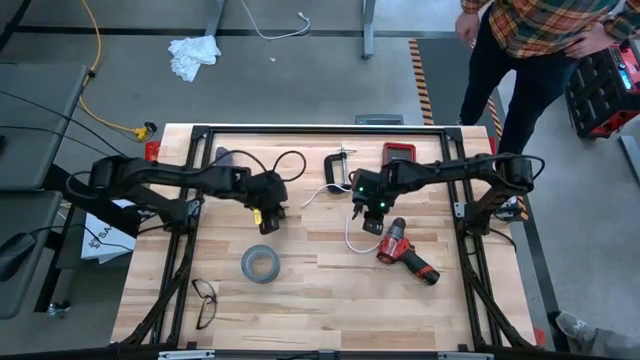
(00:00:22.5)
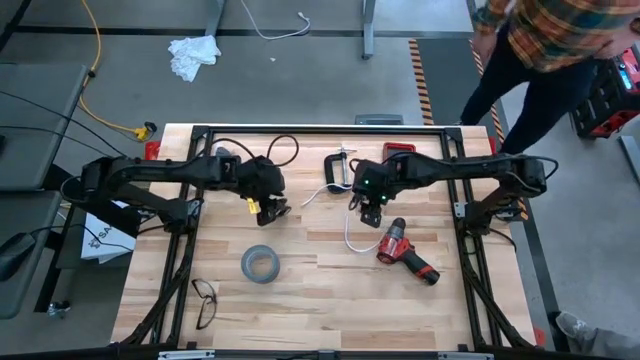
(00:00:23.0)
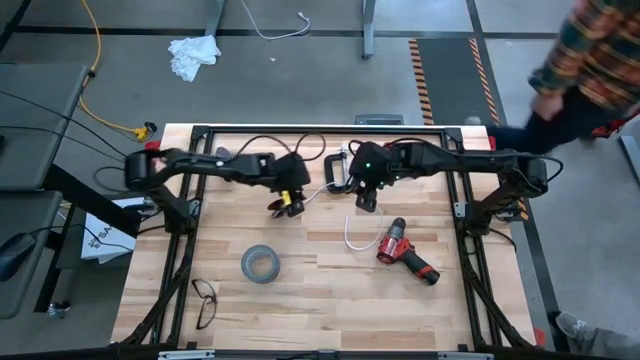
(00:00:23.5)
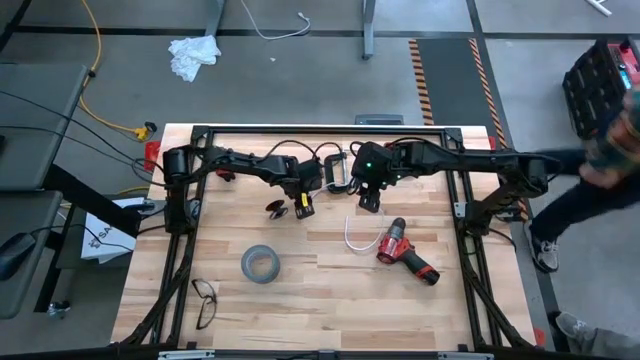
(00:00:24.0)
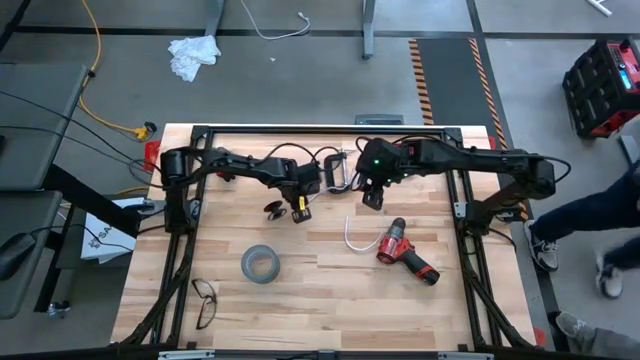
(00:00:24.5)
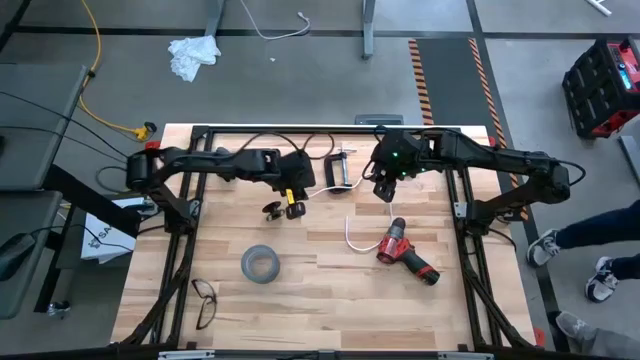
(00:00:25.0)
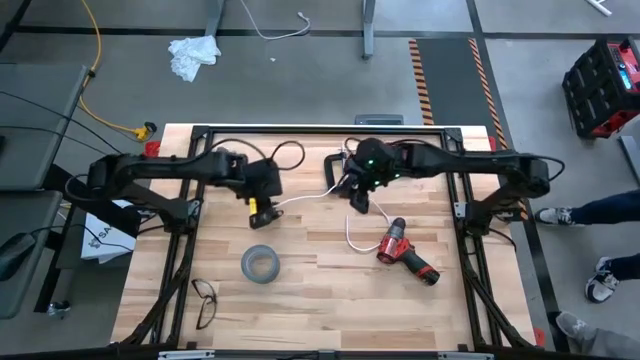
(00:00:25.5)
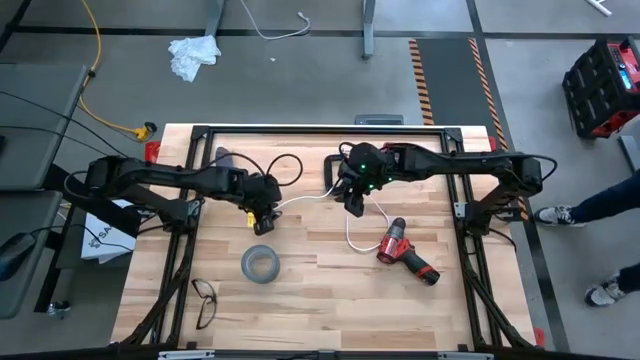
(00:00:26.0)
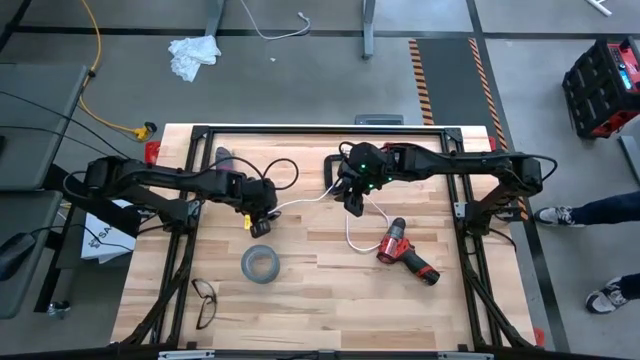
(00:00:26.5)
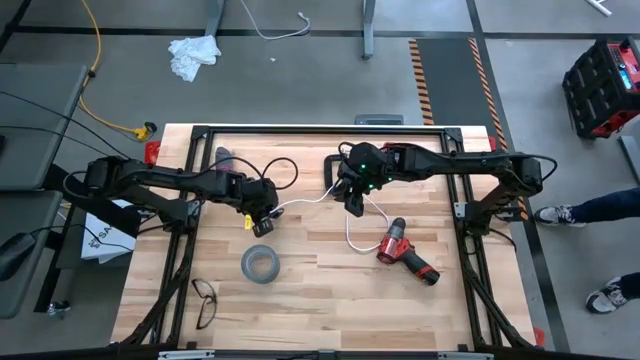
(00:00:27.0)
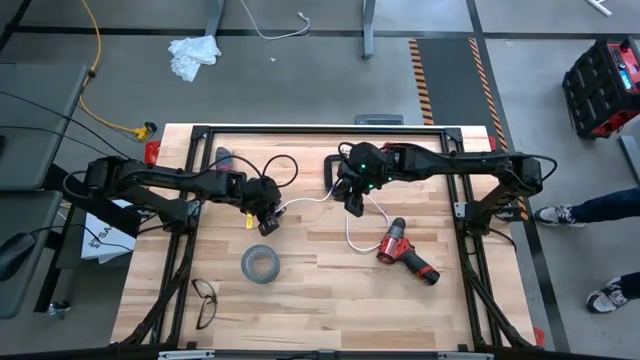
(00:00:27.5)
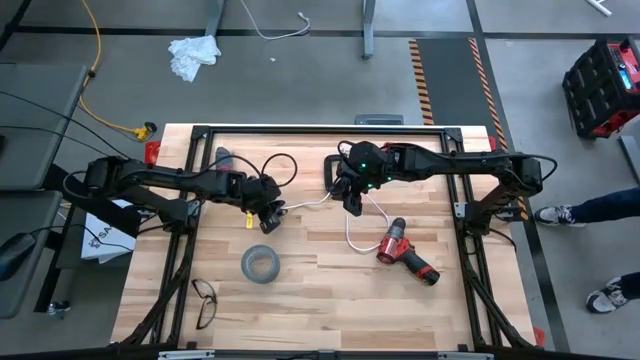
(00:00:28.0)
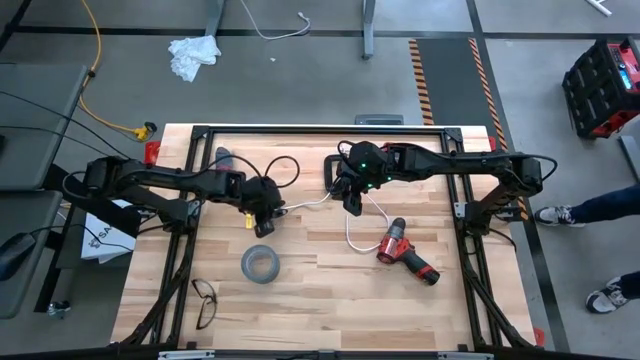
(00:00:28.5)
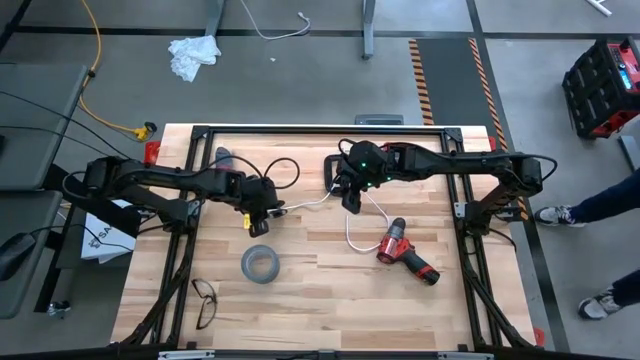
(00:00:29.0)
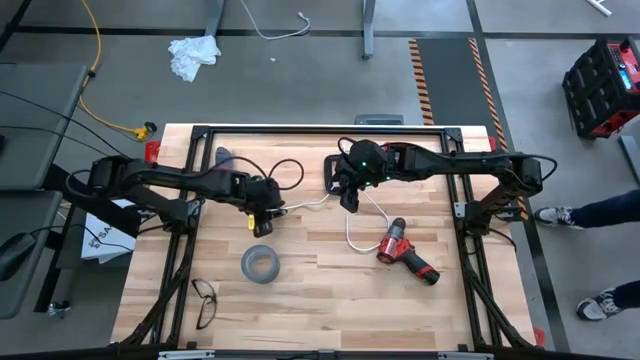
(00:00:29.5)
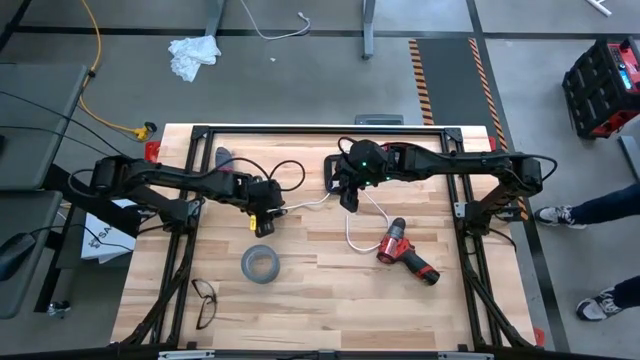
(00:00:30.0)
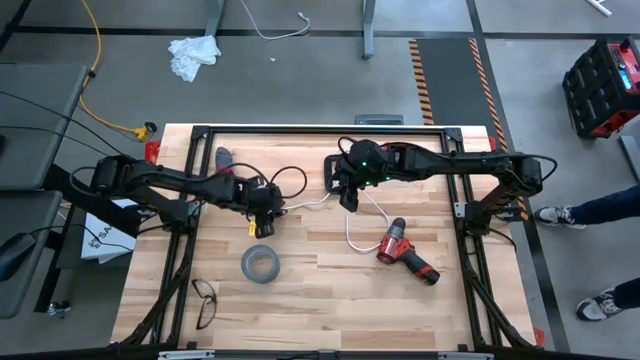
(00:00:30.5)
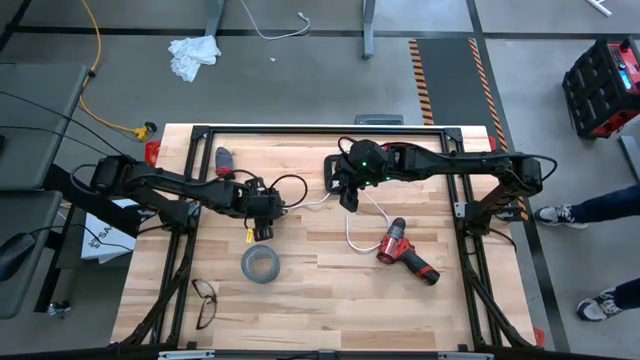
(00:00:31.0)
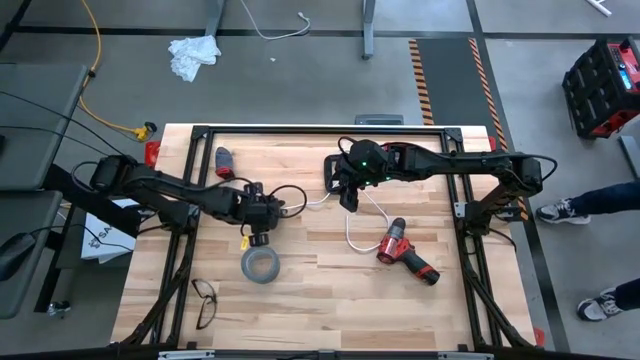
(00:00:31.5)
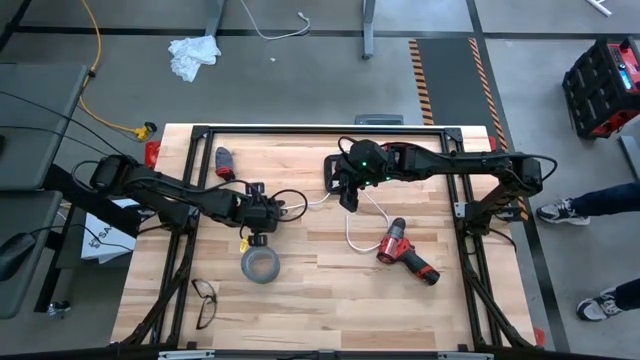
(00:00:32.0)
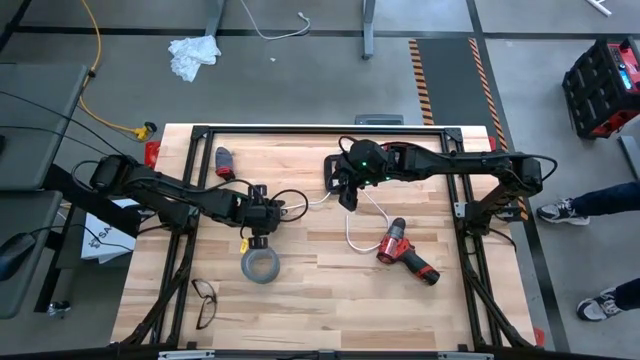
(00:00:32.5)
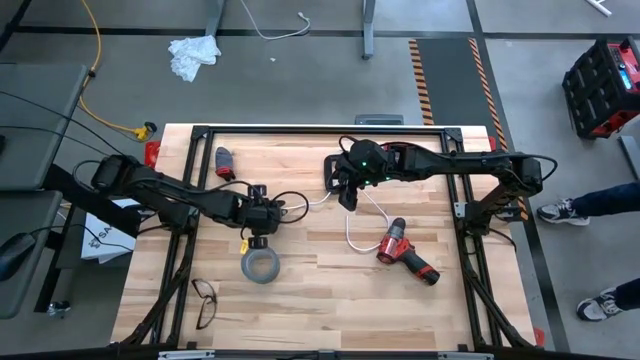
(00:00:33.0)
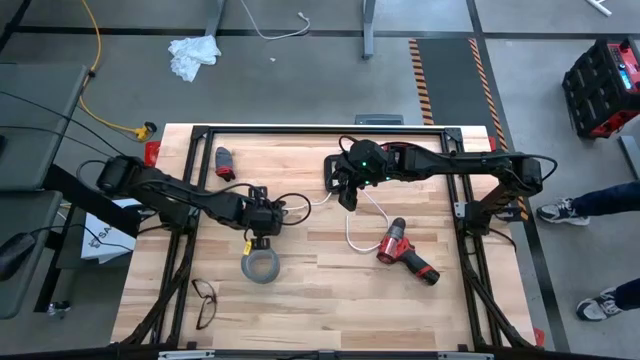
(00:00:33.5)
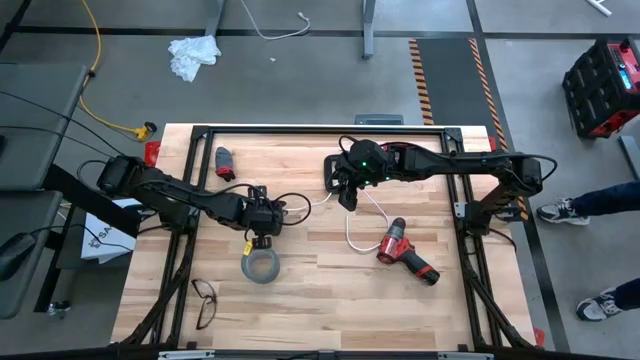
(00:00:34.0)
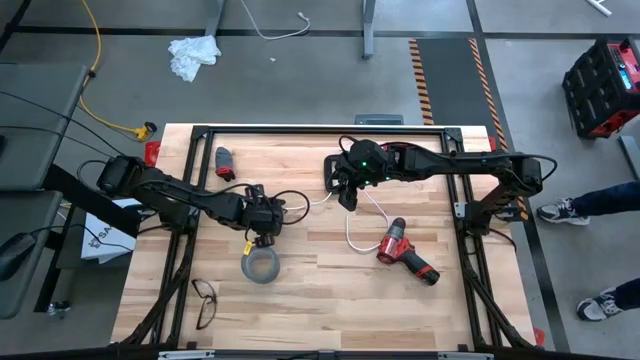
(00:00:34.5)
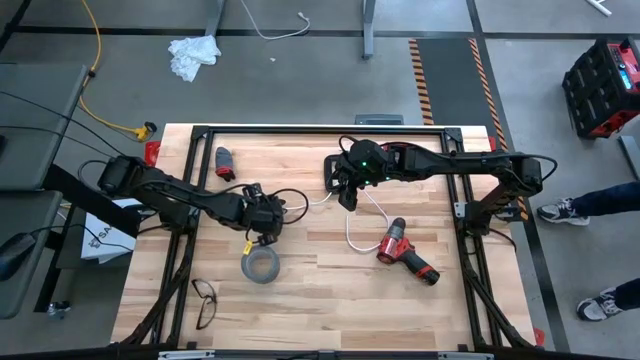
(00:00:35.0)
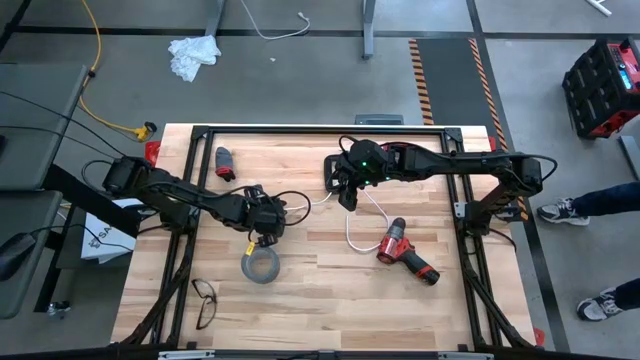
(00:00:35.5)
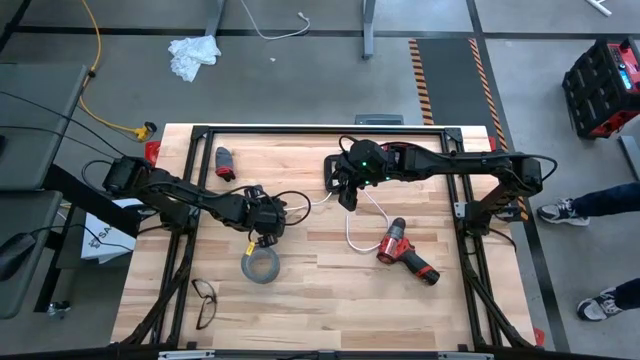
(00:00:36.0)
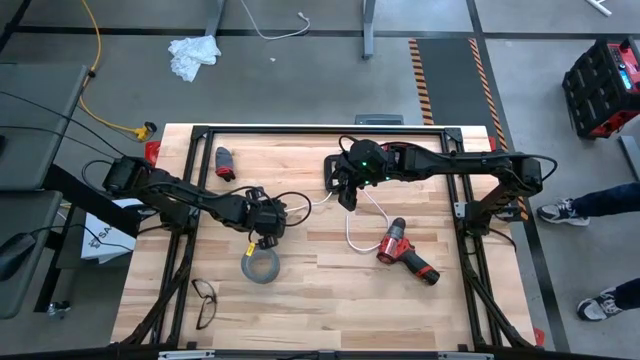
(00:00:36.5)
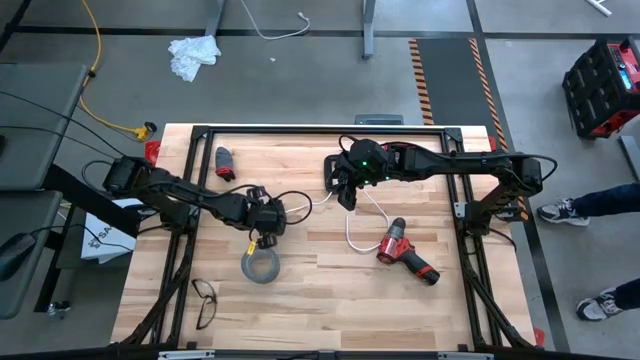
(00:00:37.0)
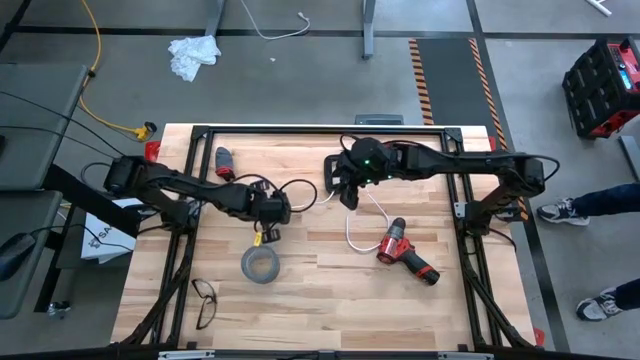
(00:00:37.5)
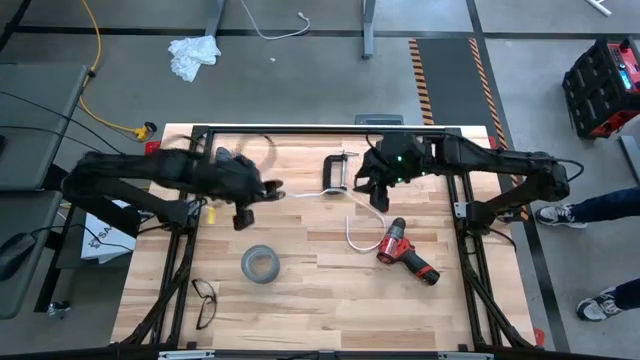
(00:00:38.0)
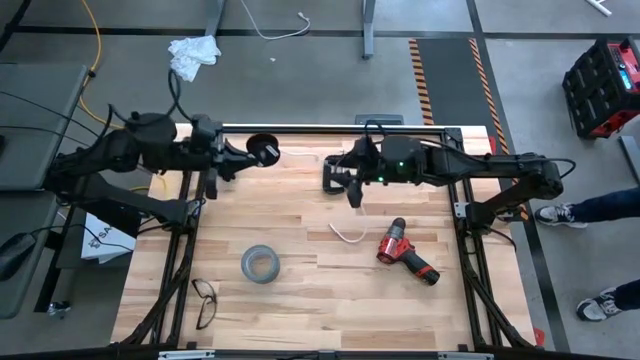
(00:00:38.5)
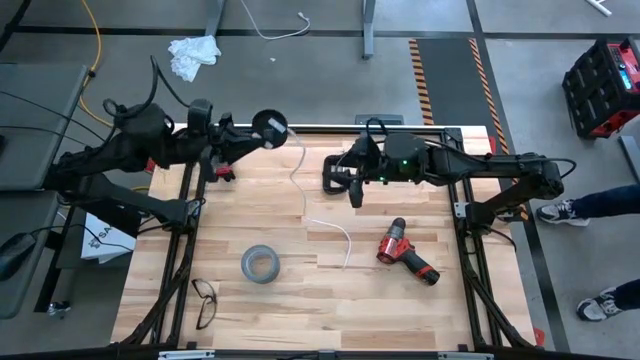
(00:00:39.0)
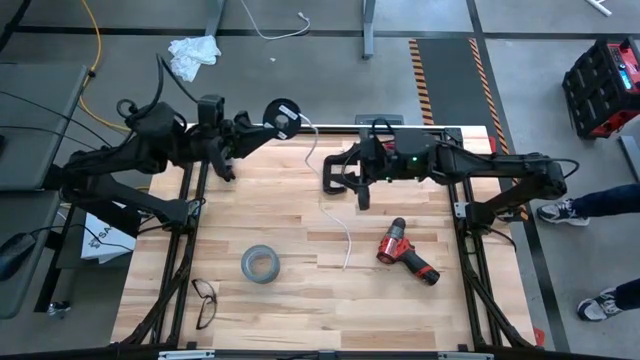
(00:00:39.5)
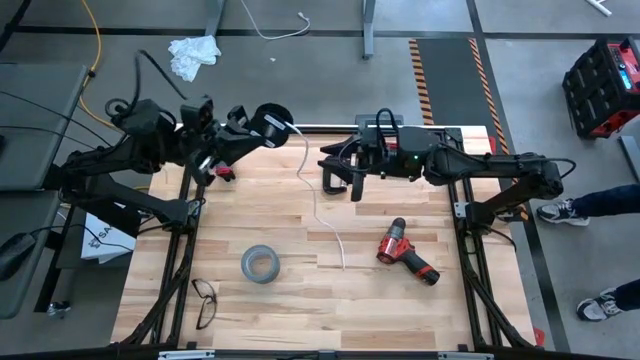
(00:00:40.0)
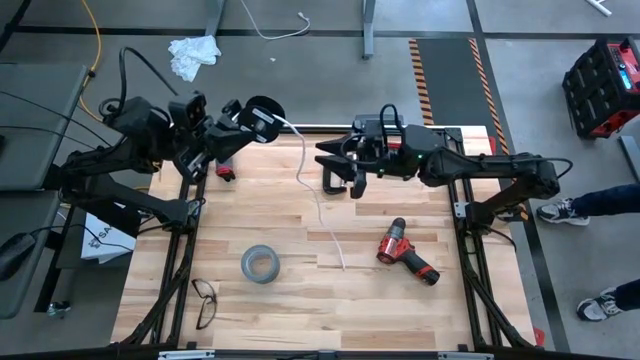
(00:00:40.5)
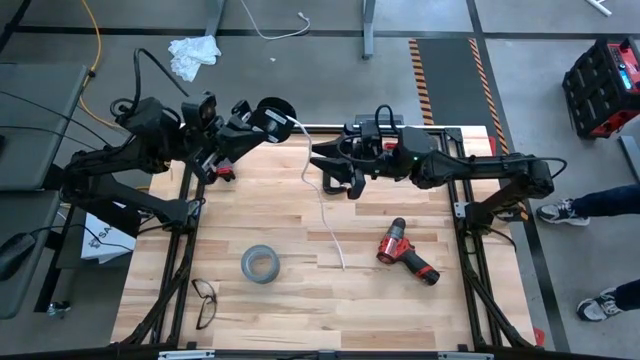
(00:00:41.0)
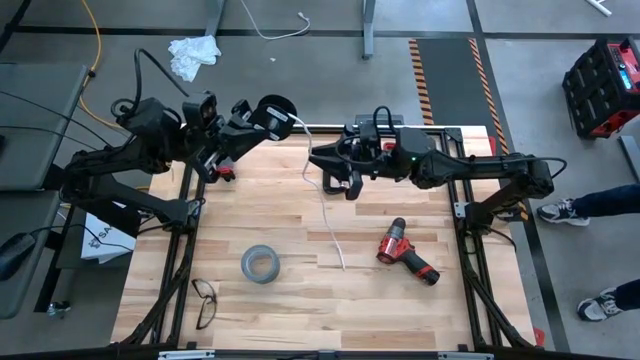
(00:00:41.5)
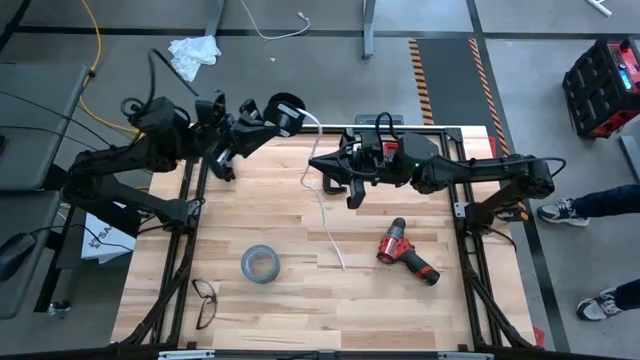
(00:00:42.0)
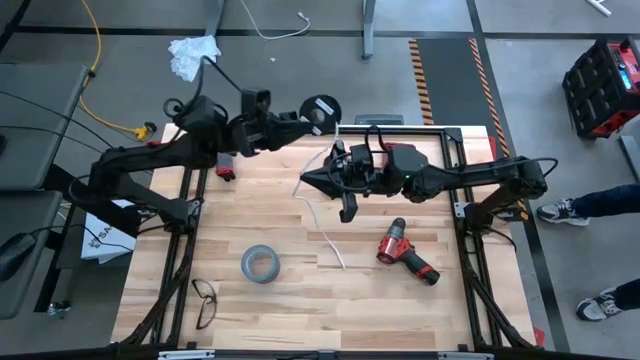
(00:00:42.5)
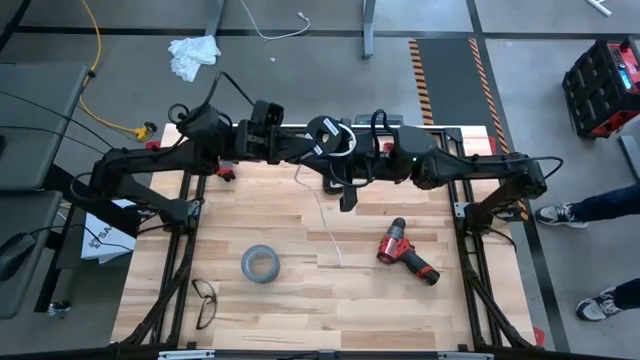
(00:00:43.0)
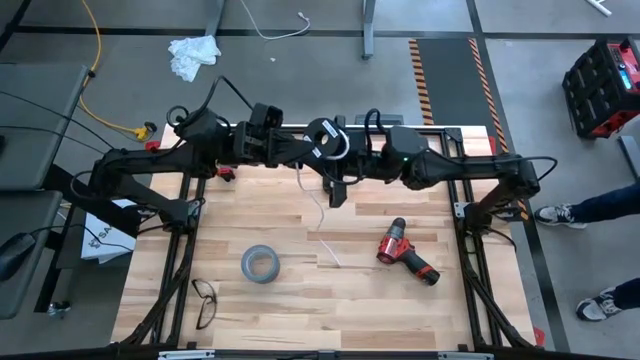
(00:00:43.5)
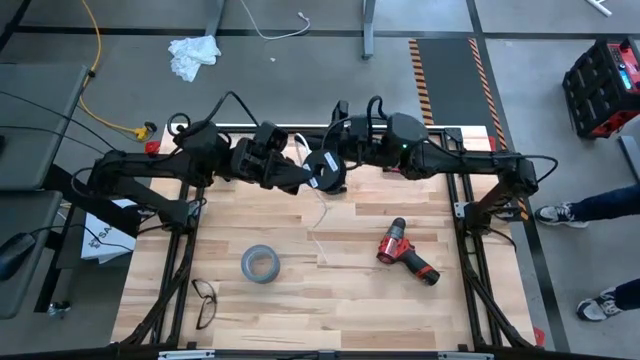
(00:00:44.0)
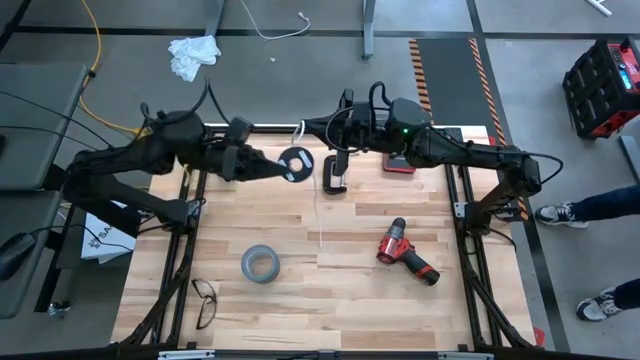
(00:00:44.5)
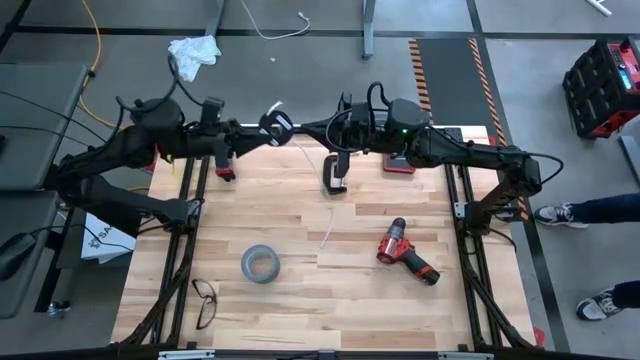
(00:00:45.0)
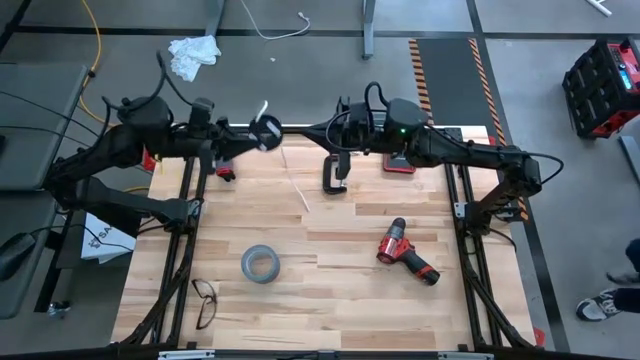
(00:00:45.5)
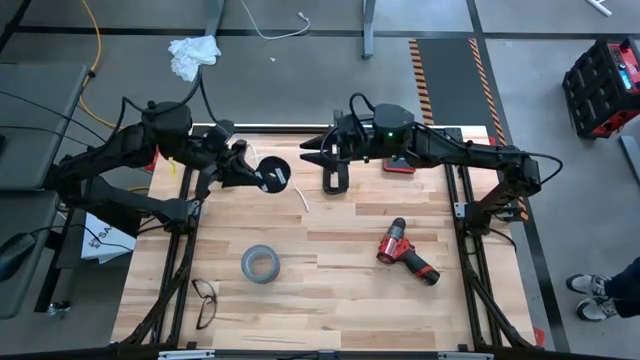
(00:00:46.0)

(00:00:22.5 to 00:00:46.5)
Task: Coil cords
Coil the white wire
